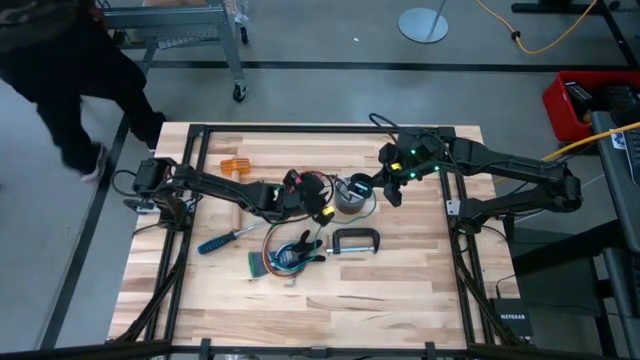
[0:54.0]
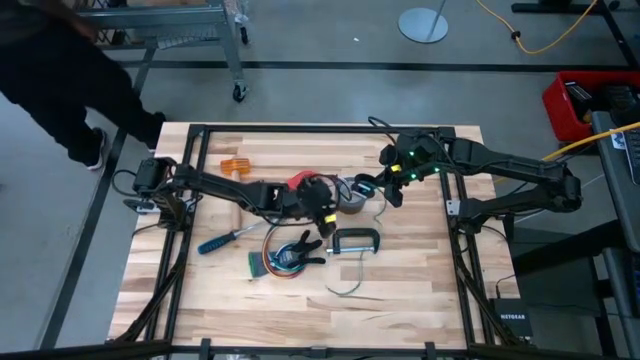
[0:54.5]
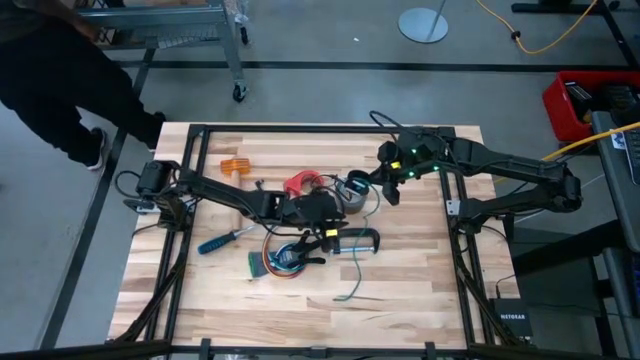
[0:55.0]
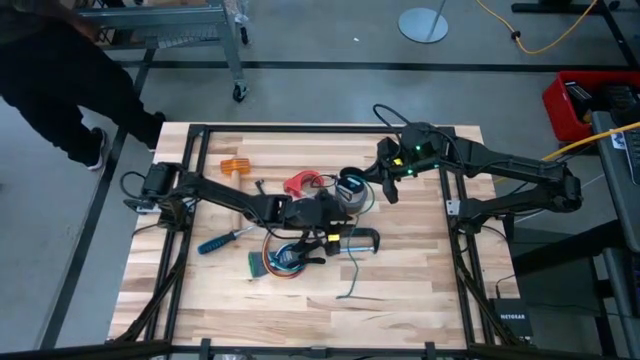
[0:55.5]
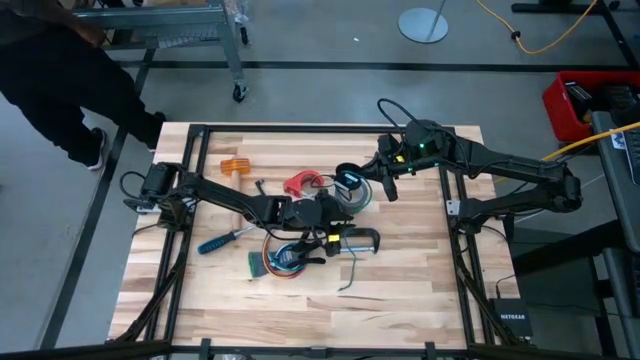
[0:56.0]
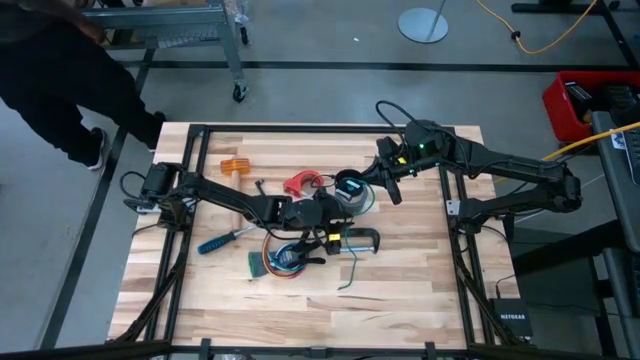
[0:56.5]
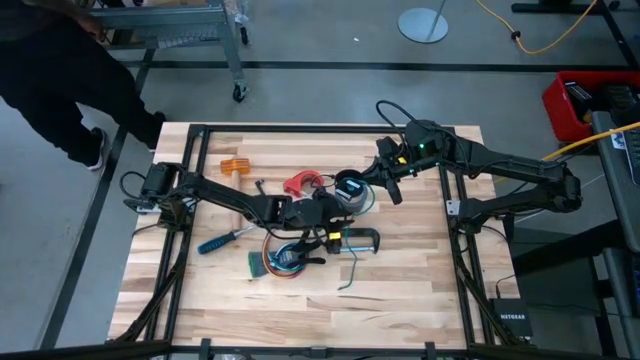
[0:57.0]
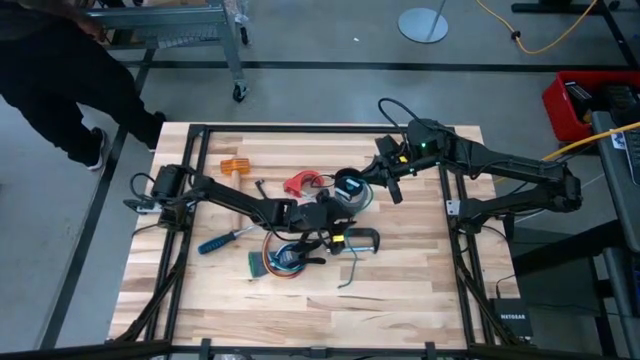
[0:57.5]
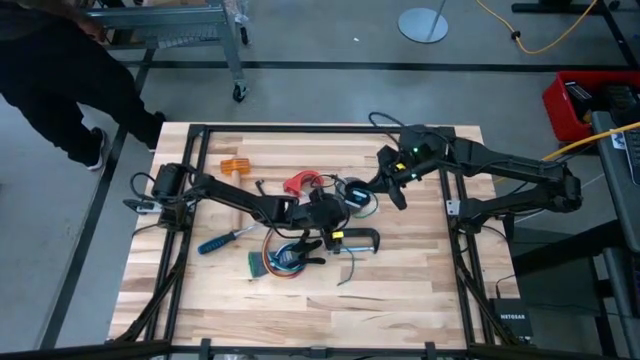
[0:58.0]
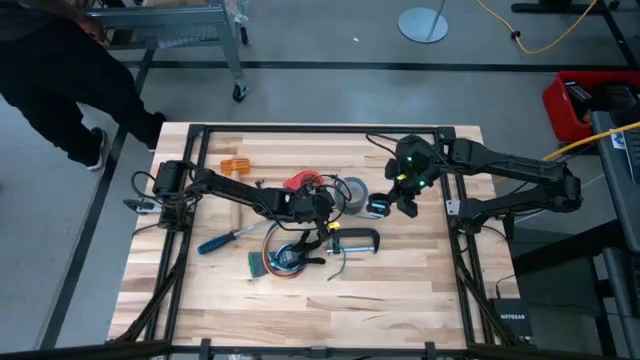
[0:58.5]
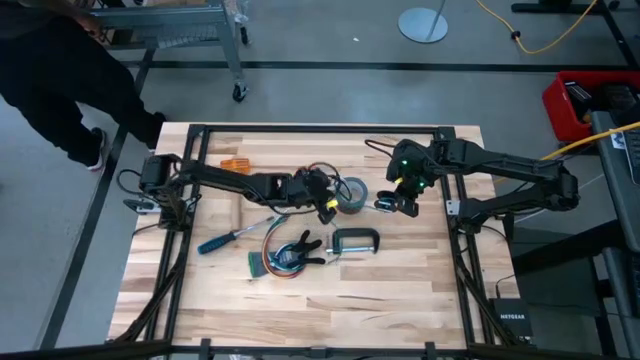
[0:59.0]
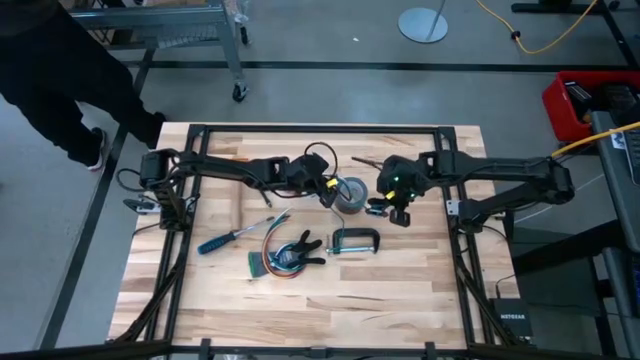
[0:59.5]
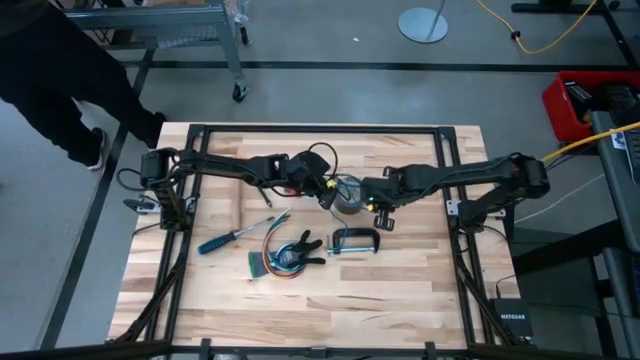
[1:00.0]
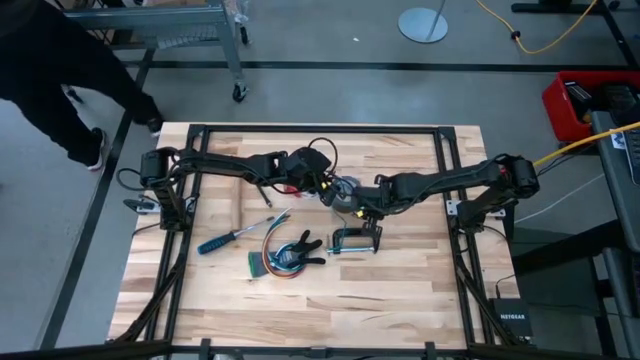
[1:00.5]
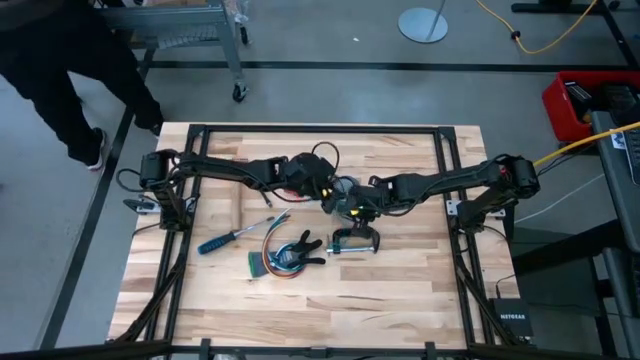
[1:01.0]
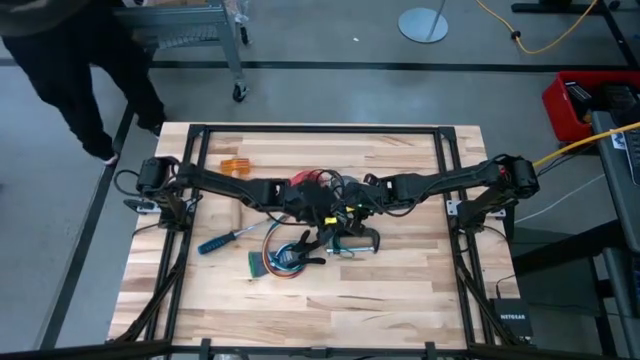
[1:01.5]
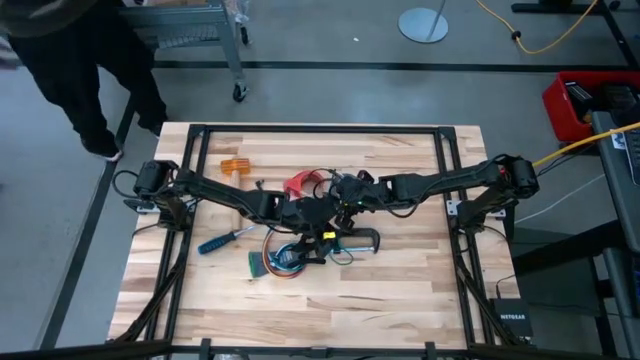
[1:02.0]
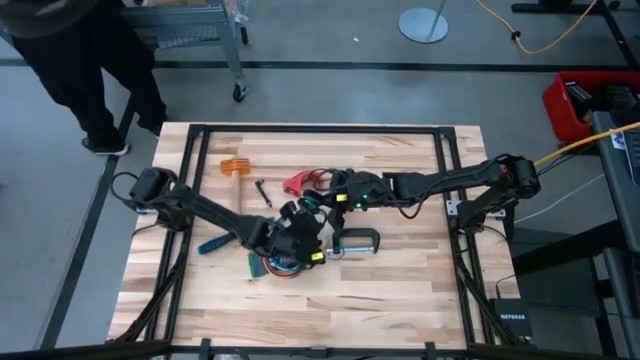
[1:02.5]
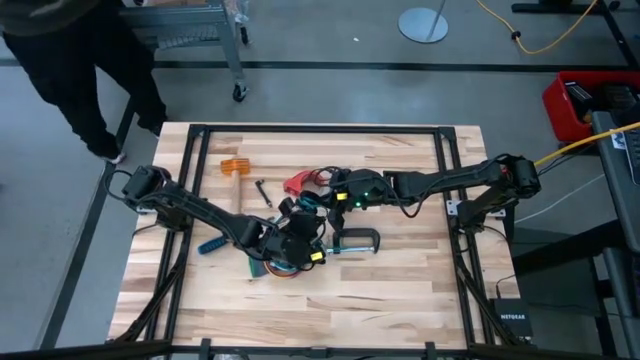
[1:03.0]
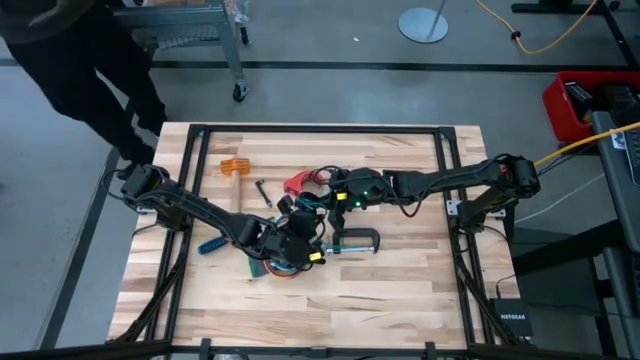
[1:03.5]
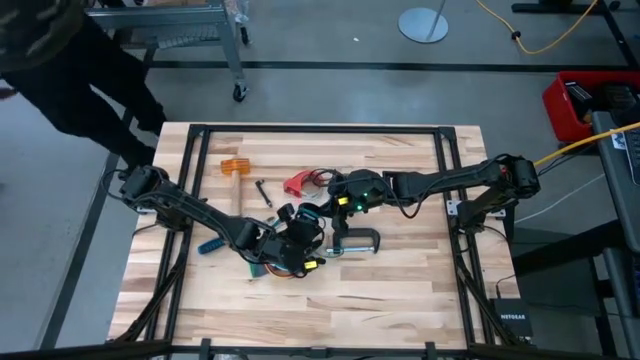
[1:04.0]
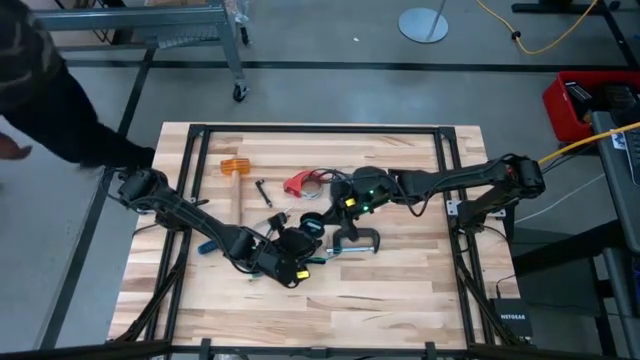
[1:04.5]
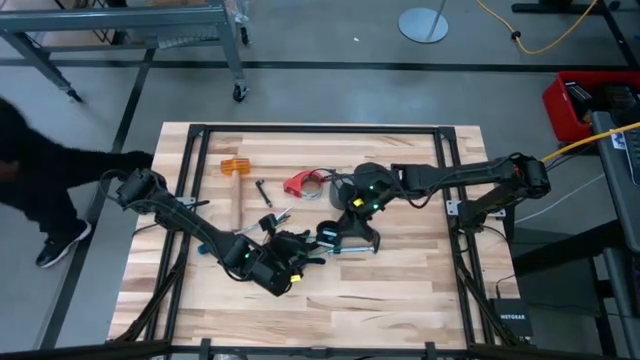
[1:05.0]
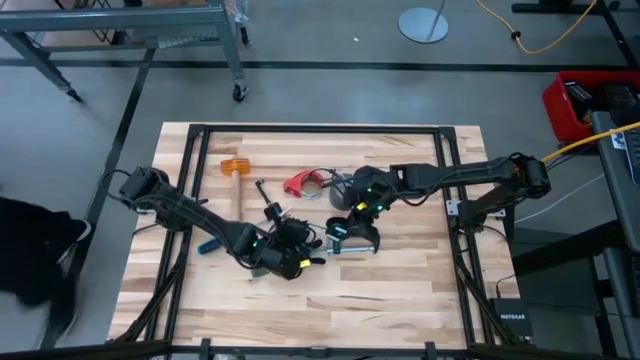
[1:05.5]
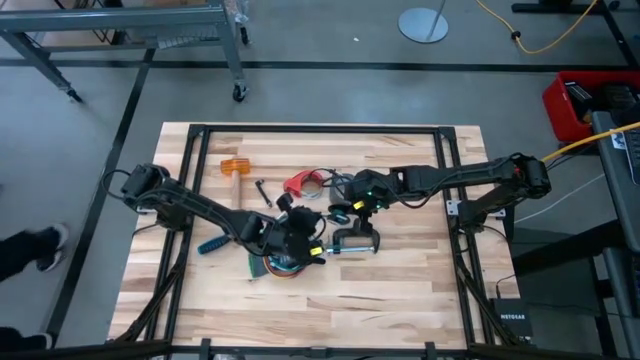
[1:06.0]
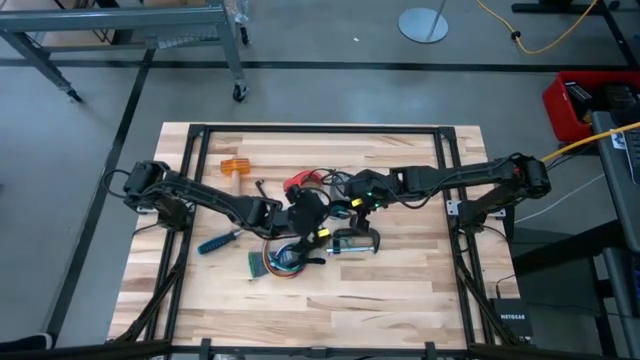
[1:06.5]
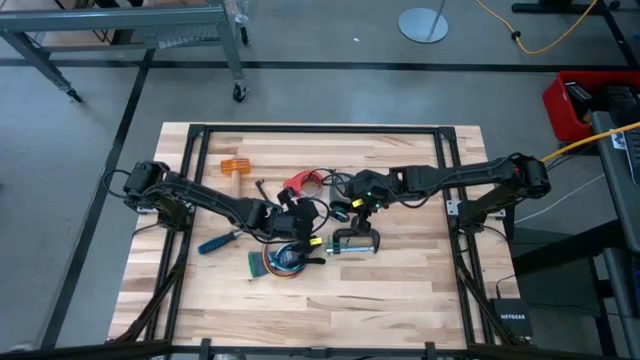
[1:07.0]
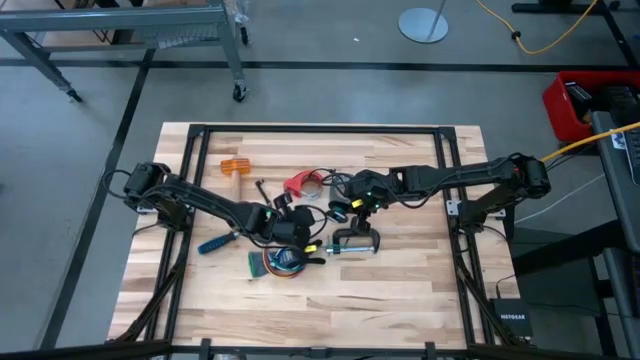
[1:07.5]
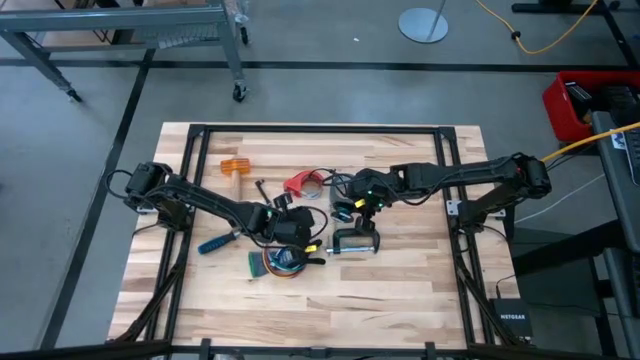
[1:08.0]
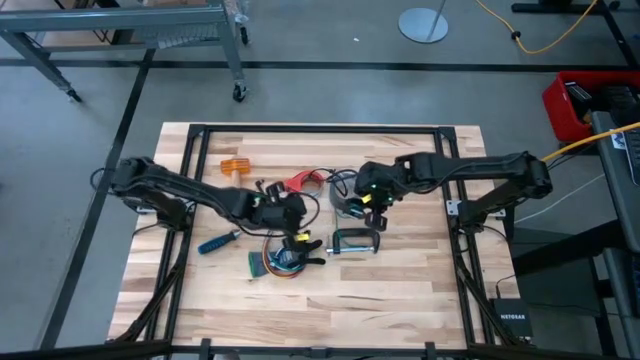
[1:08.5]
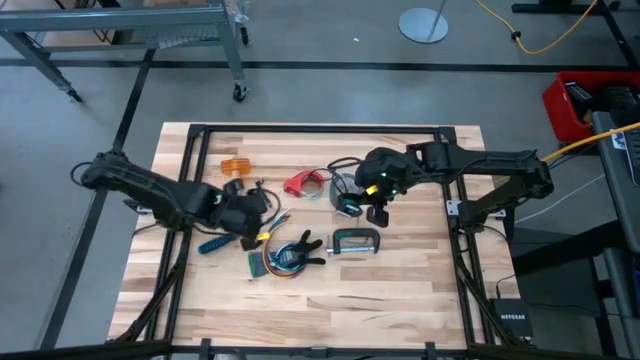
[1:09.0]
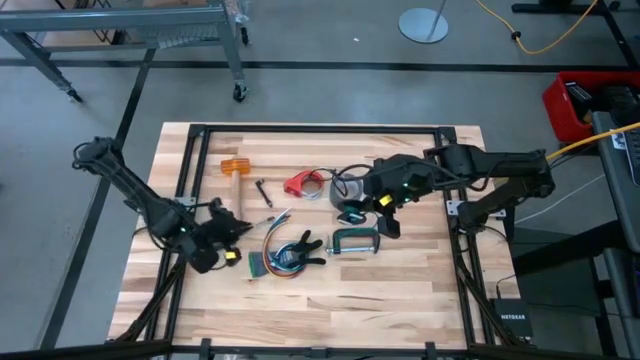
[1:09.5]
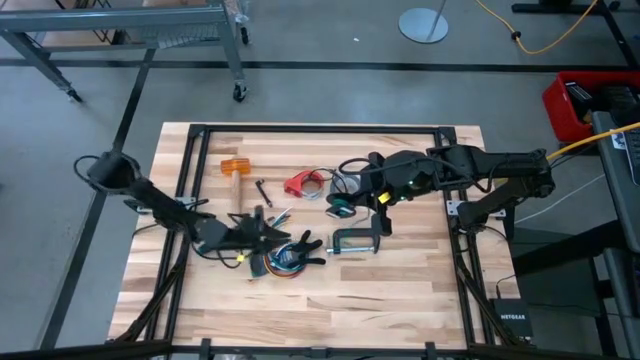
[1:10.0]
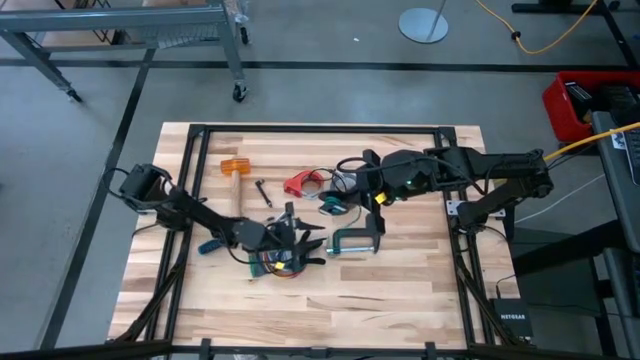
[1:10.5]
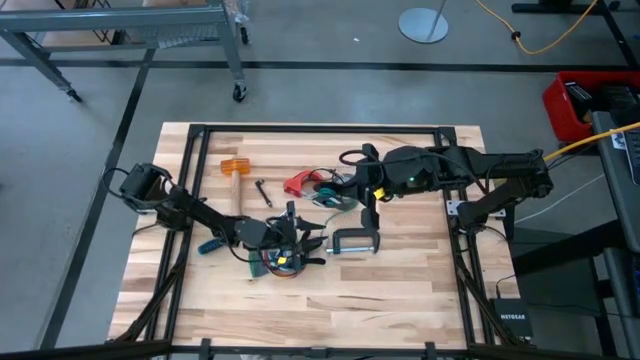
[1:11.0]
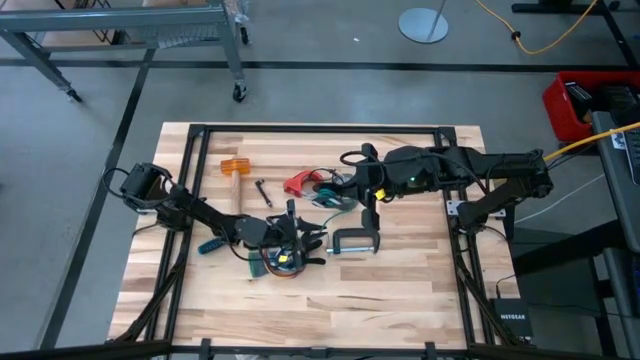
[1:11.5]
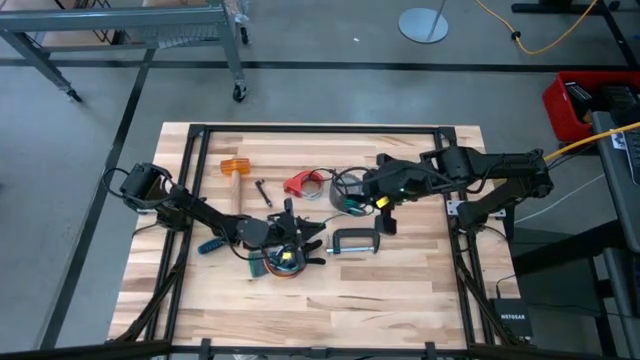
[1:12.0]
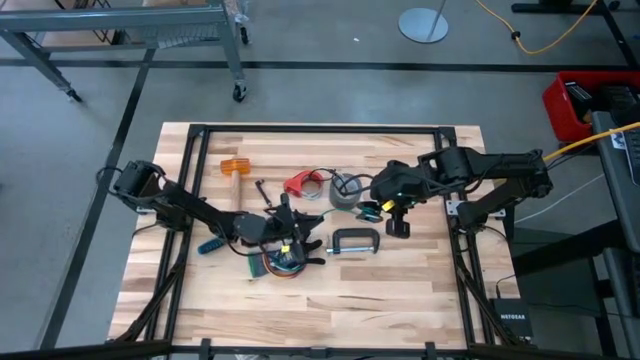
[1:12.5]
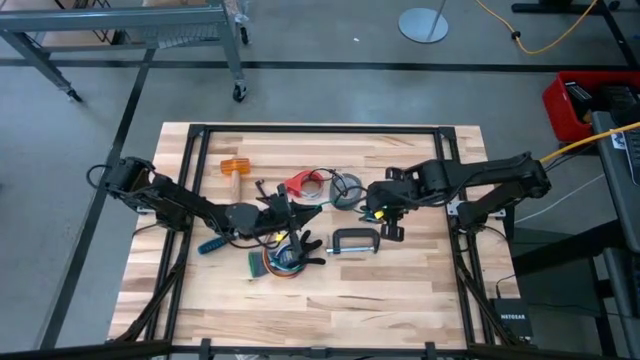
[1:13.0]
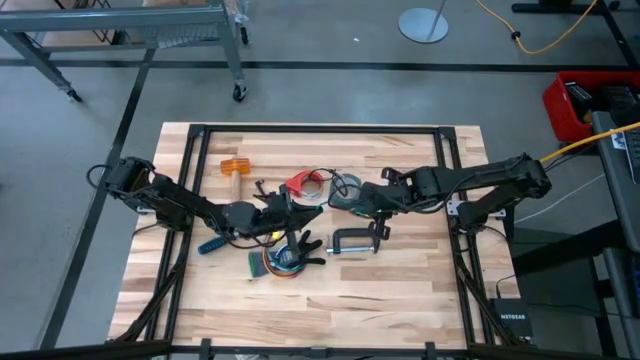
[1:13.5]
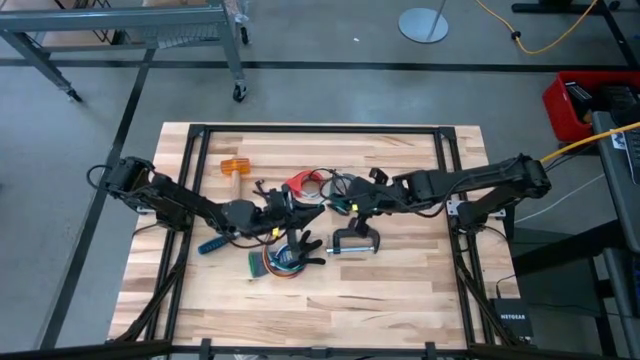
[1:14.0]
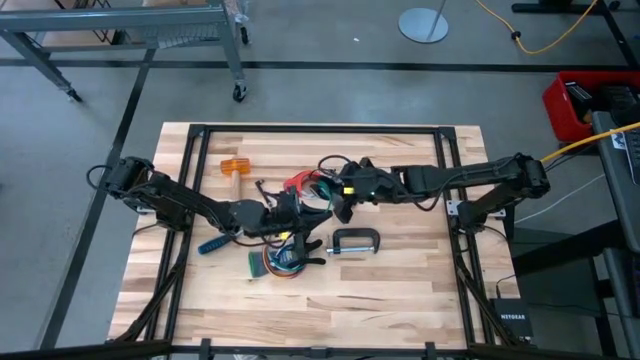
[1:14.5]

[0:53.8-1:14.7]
Task: Coil cords
Coil the blue wire onto the spool
